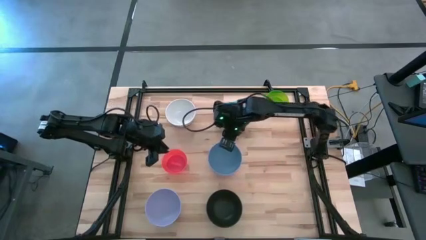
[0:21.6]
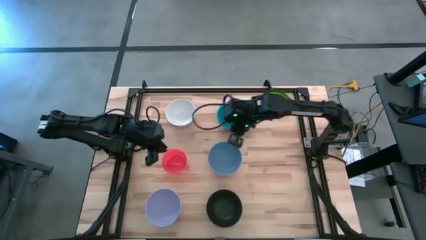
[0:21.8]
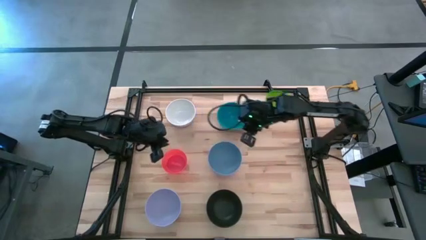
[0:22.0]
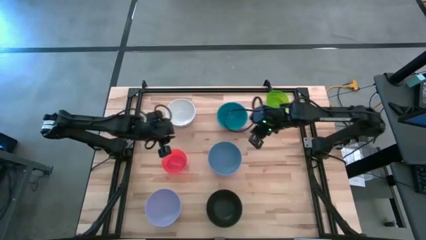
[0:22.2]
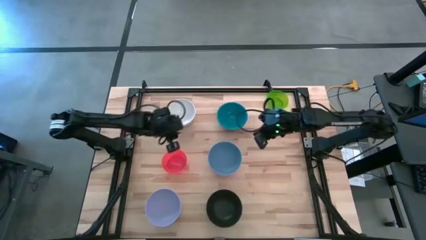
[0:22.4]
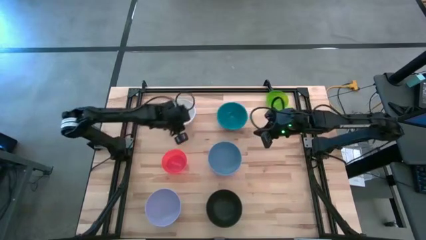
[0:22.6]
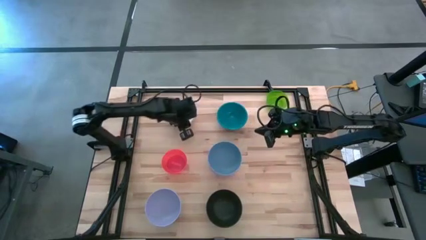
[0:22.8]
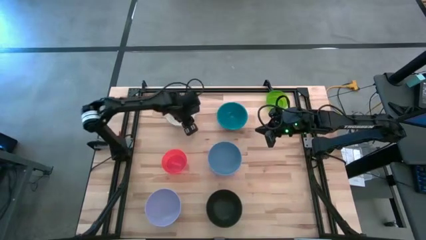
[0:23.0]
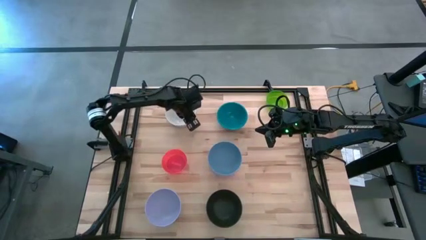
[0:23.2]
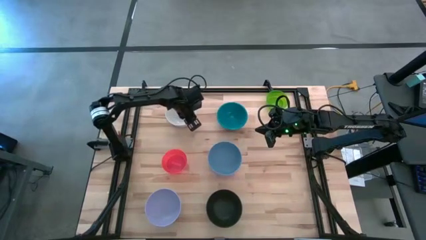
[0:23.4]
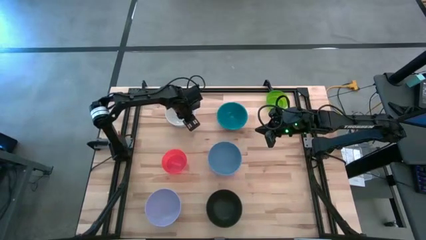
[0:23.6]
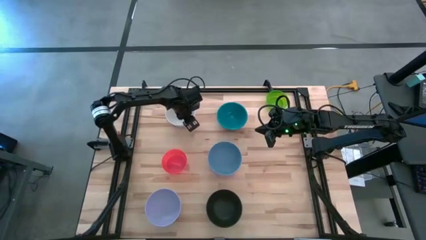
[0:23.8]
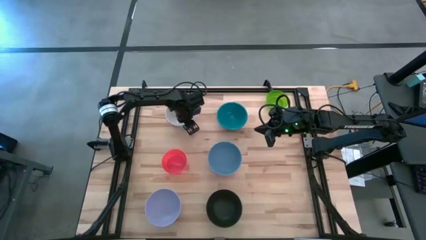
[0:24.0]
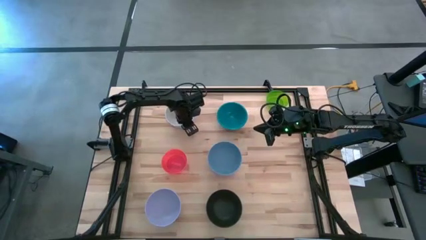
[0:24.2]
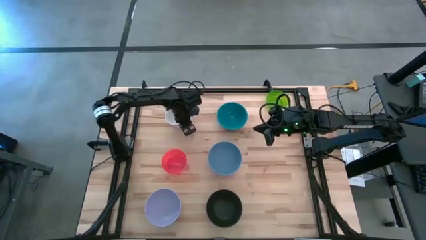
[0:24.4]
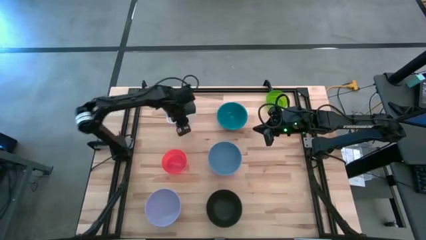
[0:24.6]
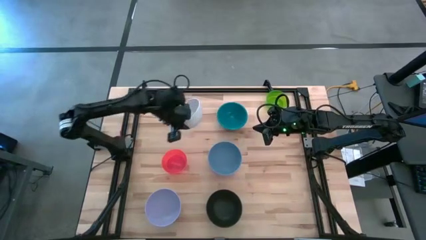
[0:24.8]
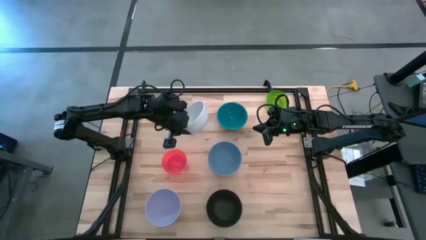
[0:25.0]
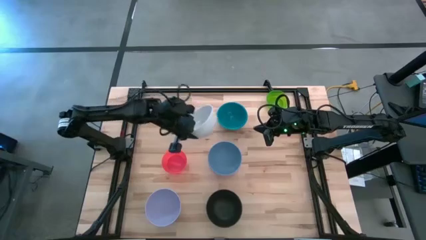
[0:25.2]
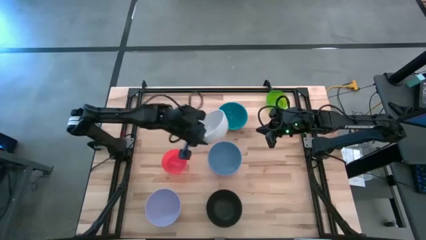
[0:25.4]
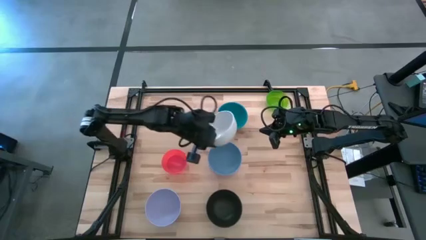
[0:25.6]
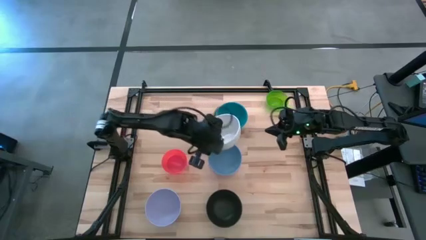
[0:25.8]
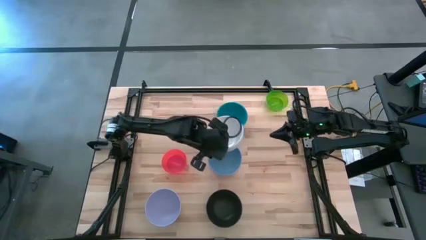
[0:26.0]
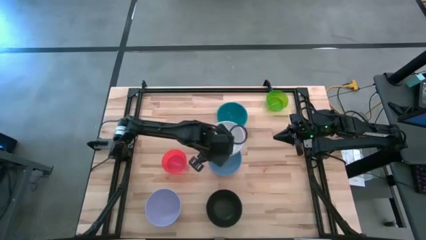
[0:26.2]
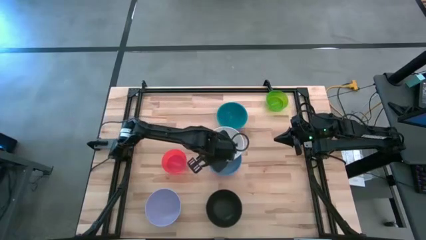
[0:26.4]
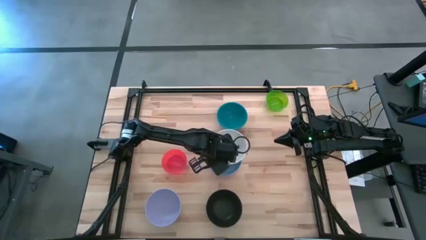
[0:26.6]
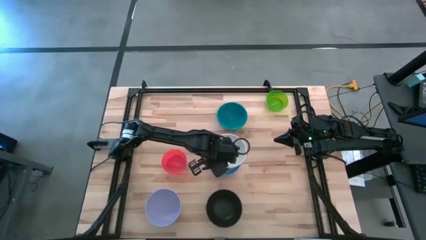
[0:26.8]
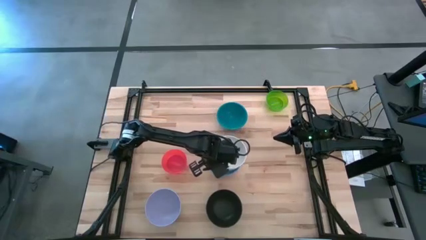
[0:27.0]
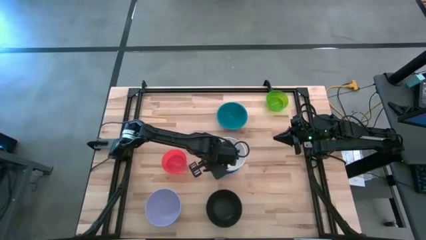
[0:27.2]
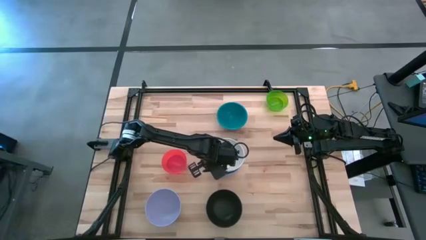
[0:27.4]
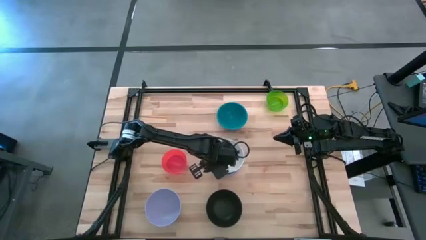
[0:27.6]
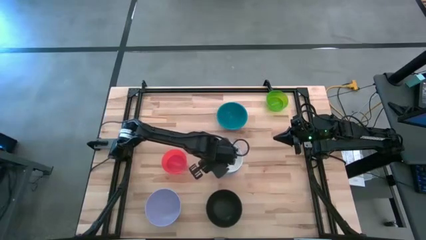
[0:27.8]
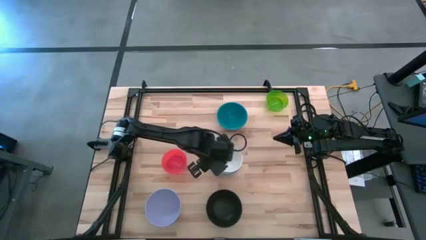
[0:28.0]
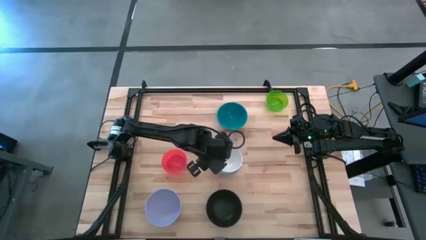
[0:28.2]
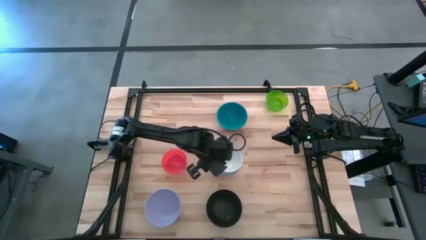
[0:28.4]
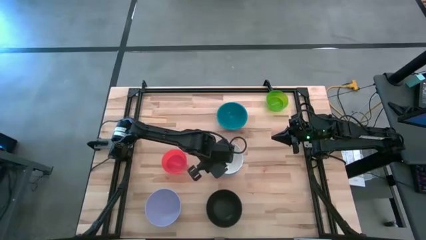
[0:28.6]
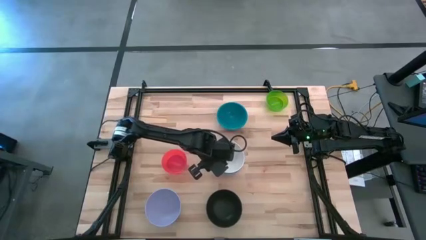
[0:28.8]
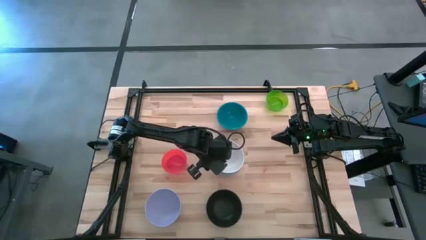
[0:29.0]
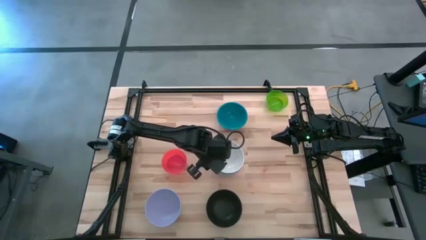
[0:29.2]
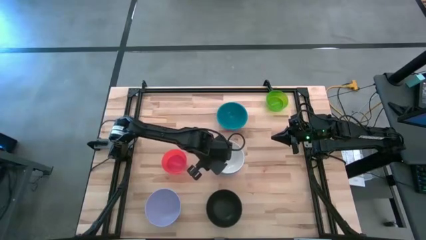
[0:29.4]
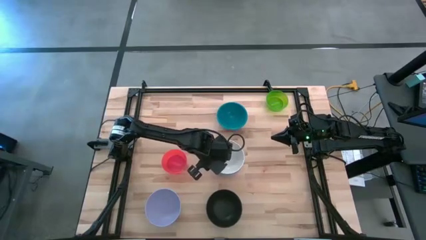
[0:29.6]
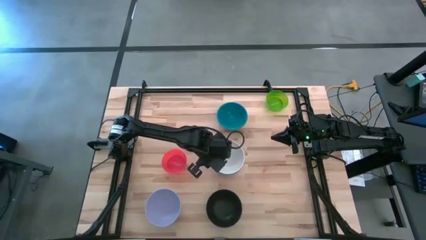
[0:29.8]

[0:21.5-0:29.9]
Task: Nest bowls inside each other
Stack the white bowl on top of the blue bowl

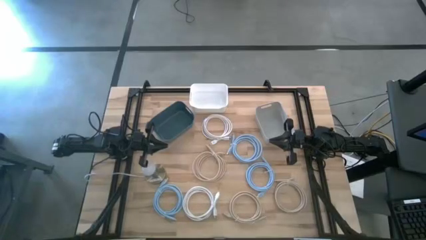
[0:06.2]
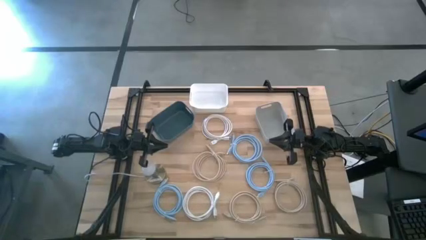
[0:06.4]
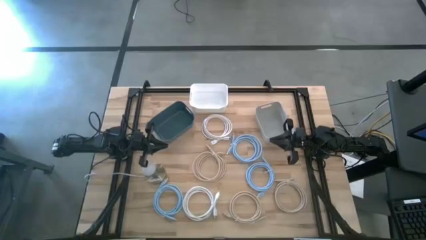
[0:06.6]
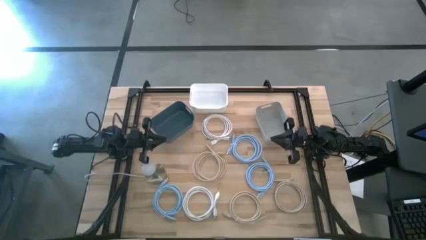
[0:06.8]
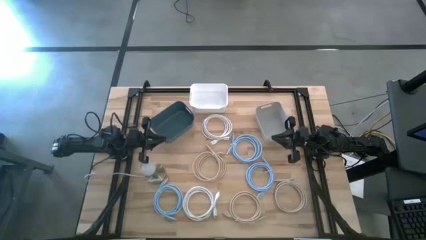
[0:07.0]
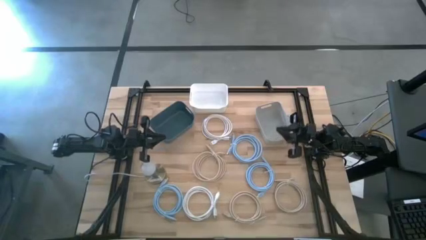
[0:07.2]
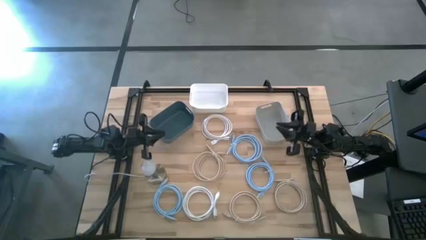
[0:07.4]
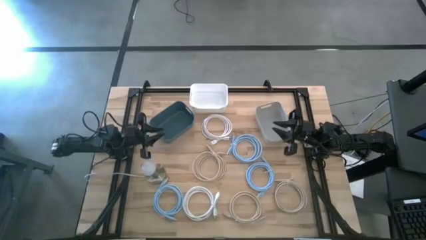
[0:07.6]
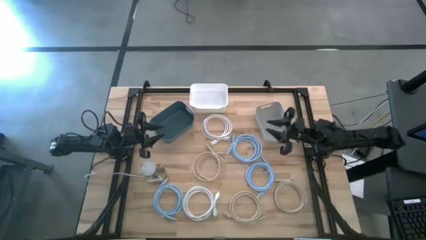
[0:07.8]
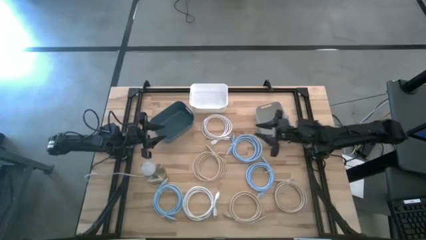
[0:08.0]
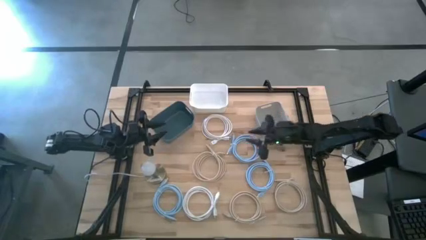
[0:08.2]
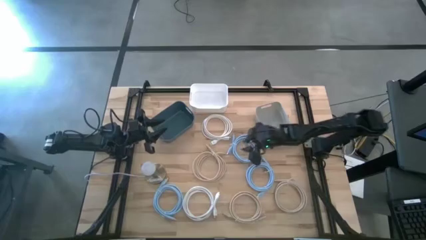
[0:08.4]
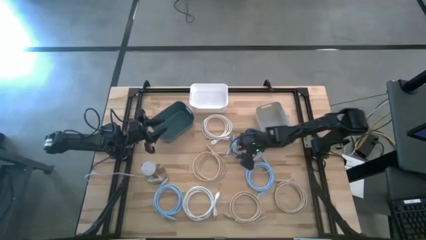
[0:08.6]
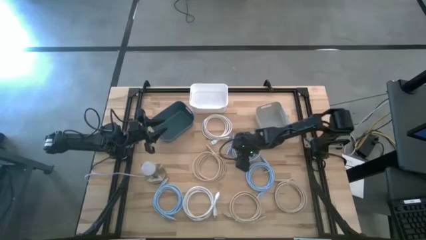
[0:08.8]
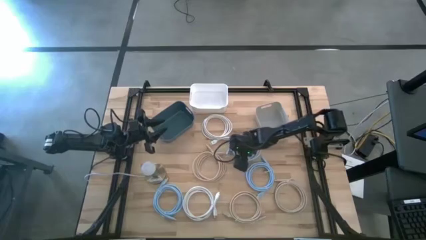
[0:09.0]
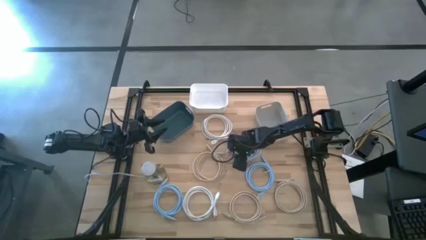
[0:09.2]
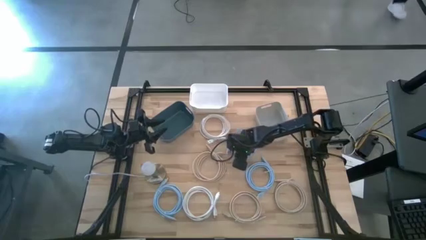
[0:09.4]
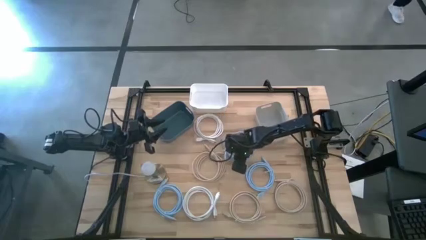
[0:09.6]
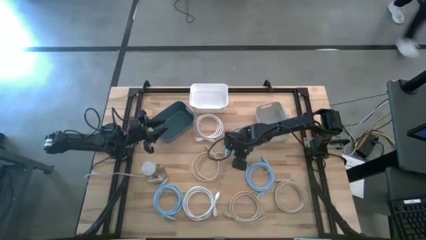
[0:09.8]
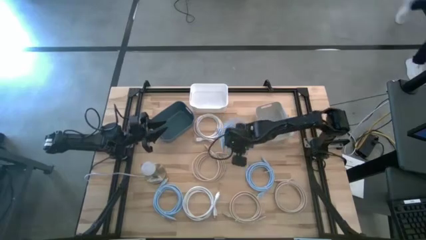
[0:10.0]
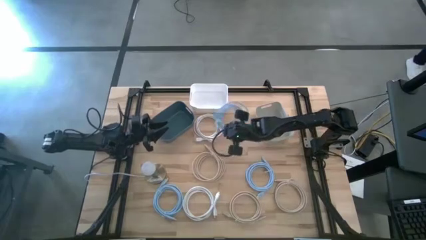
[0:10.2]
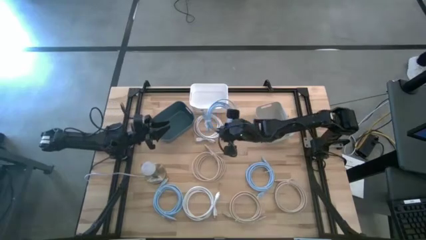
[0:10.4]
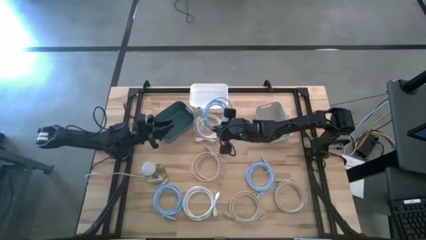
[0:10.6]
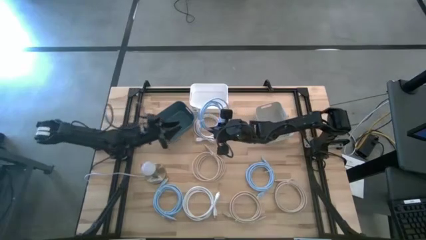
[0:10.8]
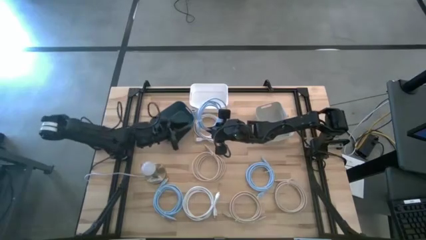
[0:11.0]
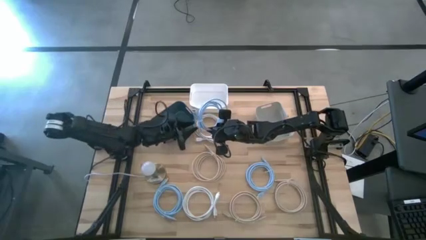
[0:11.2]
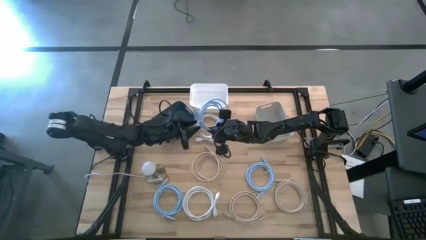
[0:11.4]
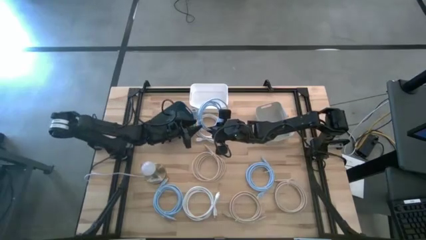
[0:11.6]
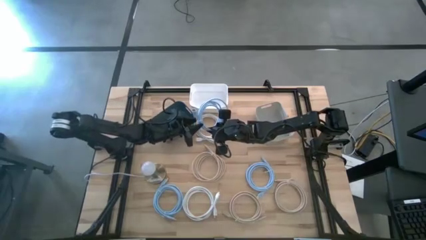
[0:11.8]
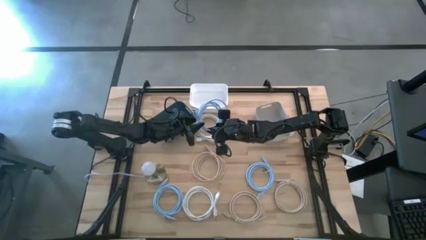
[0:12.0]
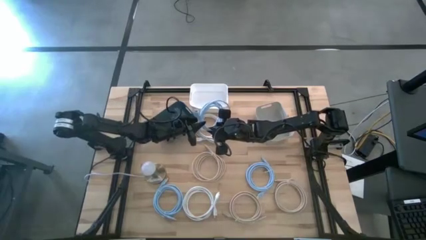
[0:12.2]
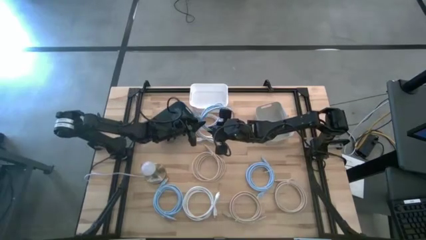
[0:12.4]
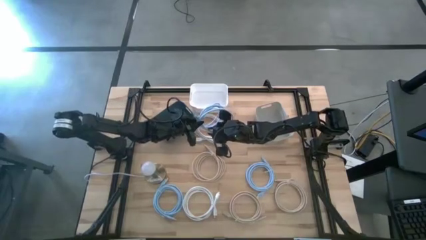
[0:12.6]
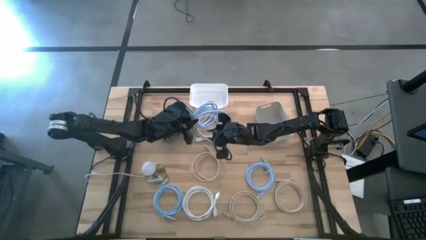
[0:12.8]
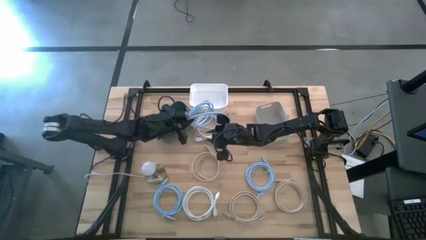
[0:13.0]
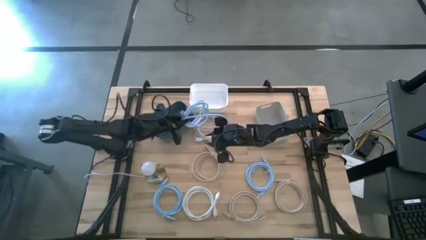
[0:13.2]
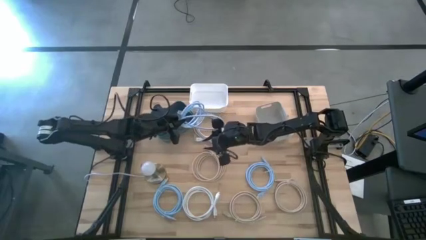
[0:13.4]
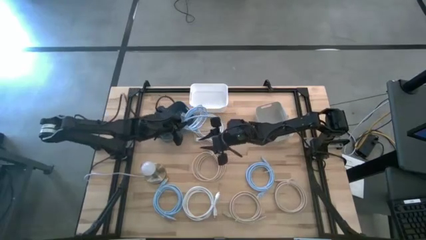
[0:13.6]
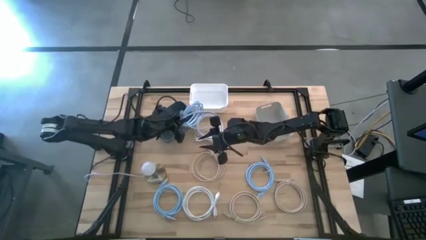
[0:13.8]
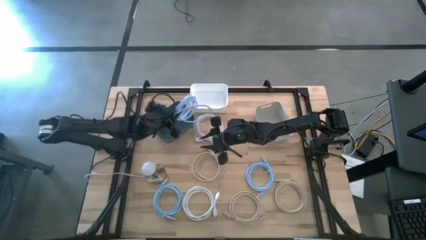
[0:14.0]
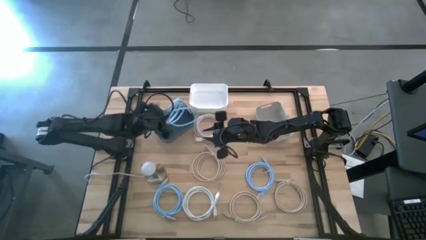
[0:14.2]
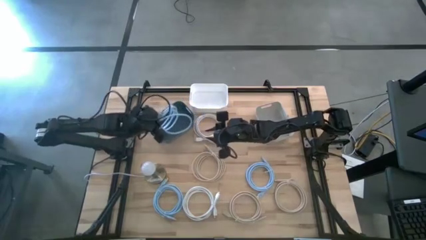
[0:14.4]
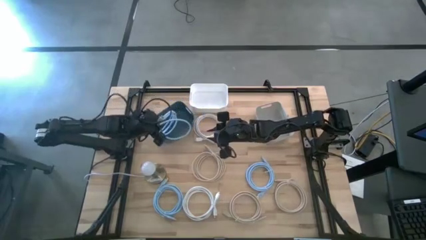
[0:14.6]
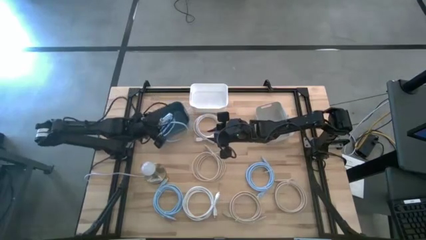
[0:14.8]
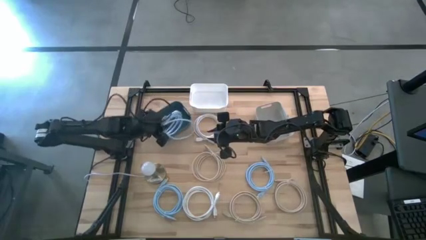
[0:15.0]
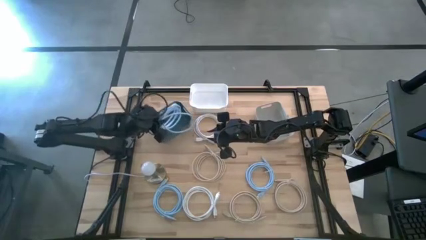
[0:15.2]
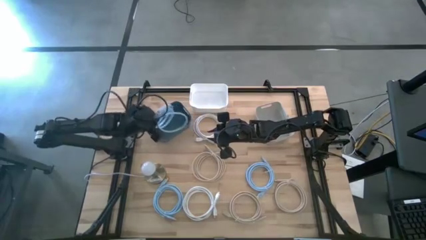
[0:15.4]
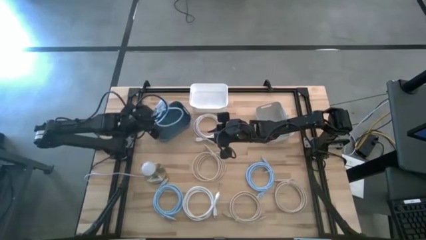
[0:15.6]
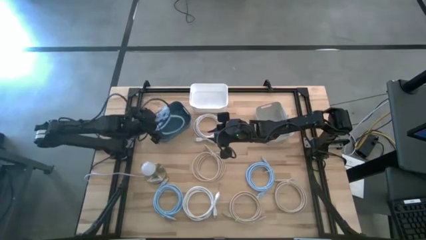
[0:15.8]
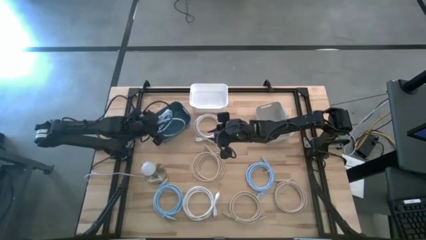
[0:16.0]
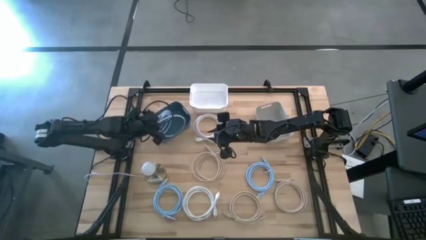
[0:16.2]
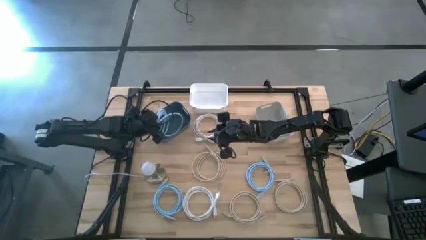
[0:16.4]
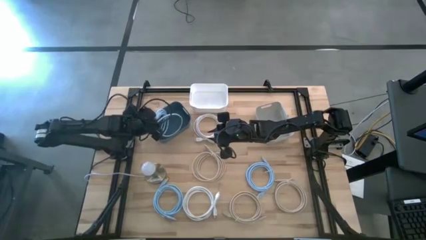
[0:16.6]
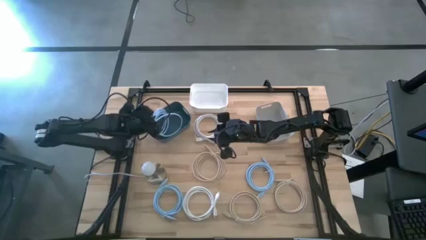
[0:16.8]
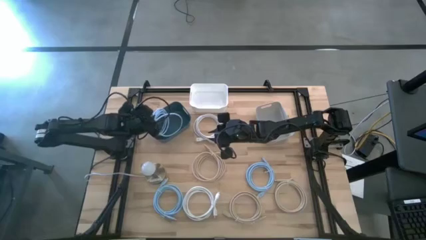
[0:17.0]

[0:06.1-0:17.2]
Task: Sort HDMI cables
Put the top right blue hdmi cable into the blue bin
